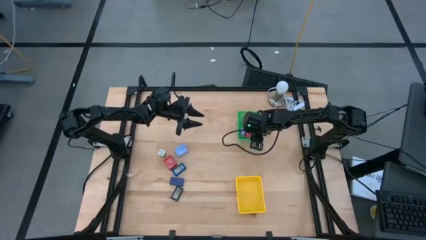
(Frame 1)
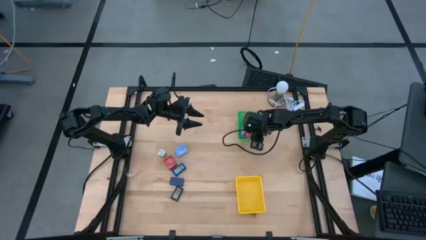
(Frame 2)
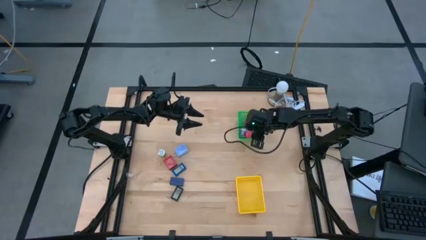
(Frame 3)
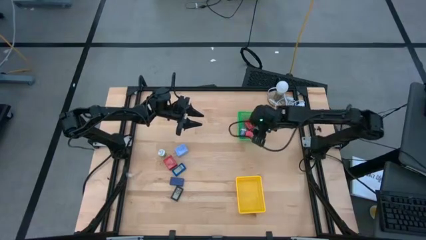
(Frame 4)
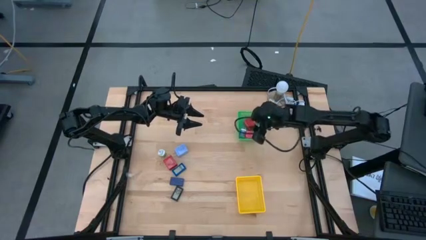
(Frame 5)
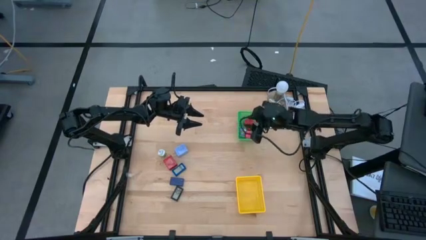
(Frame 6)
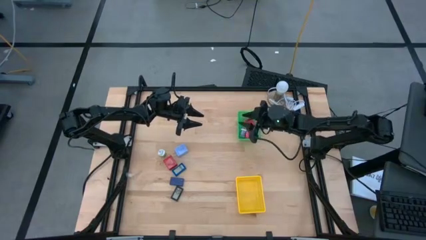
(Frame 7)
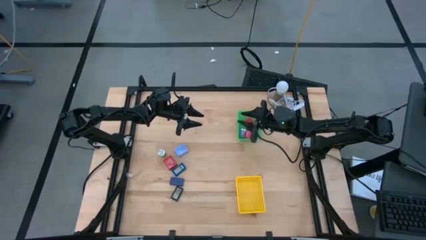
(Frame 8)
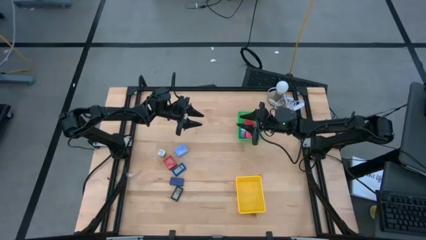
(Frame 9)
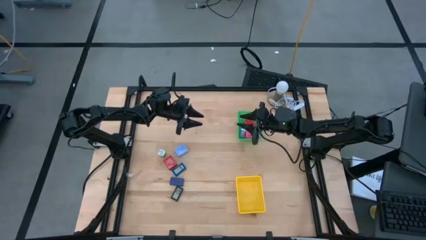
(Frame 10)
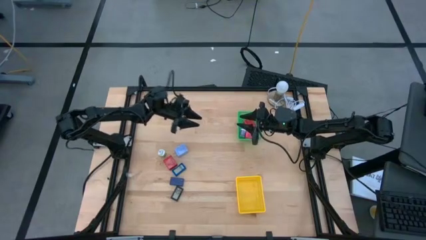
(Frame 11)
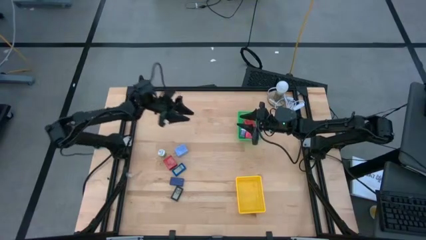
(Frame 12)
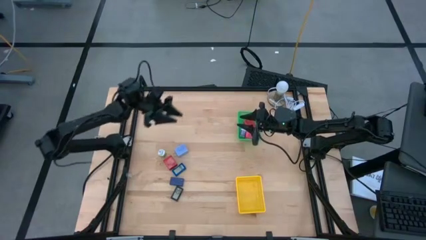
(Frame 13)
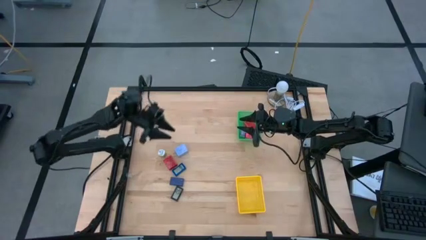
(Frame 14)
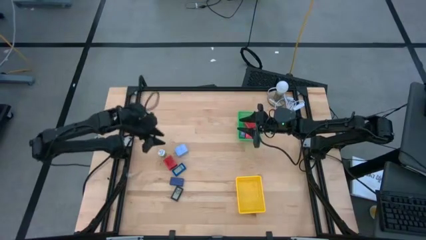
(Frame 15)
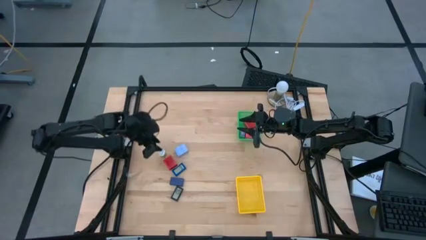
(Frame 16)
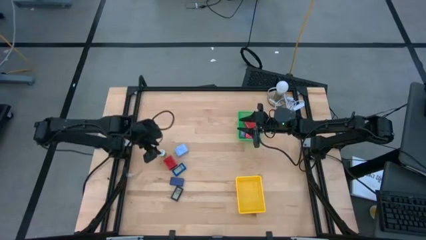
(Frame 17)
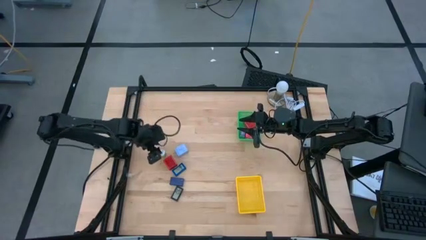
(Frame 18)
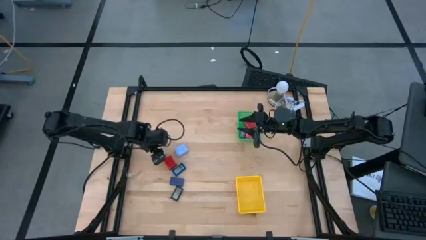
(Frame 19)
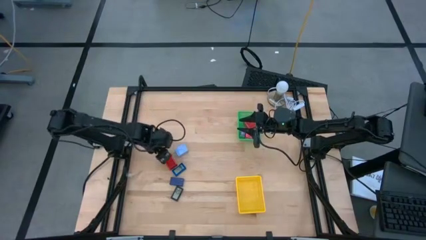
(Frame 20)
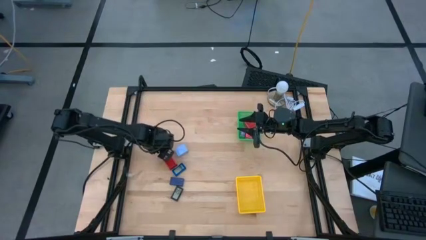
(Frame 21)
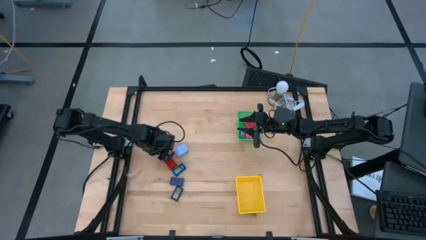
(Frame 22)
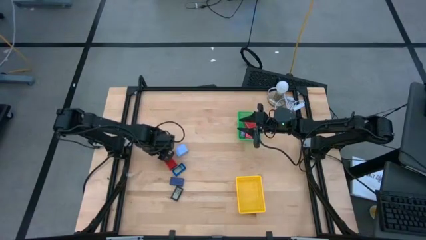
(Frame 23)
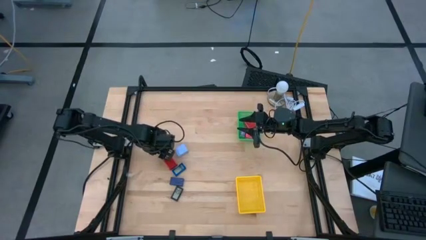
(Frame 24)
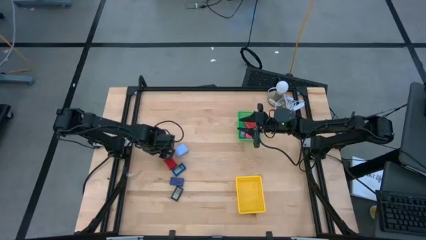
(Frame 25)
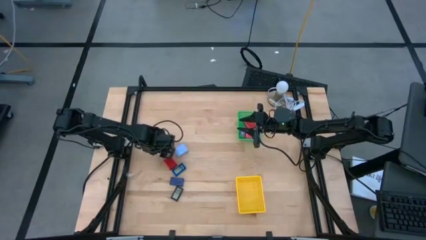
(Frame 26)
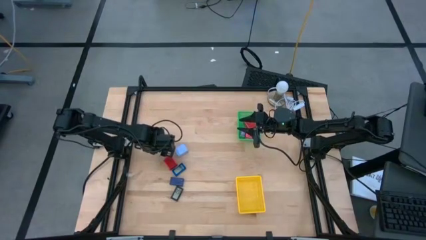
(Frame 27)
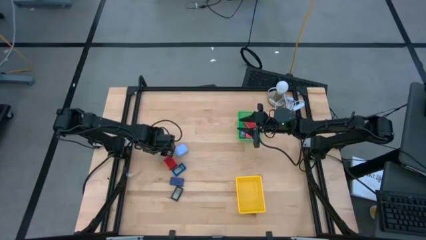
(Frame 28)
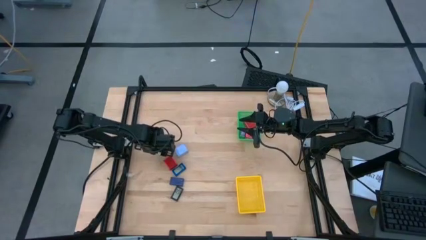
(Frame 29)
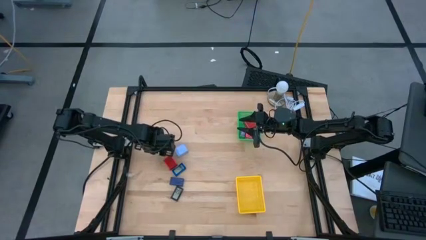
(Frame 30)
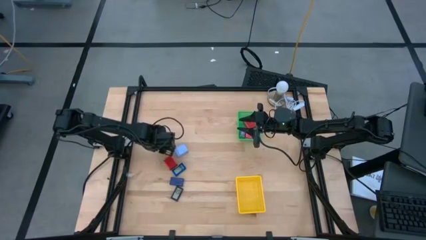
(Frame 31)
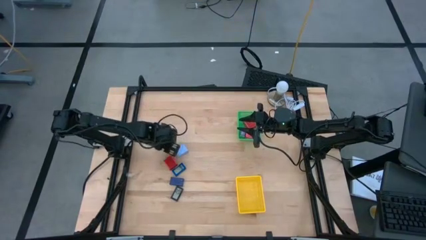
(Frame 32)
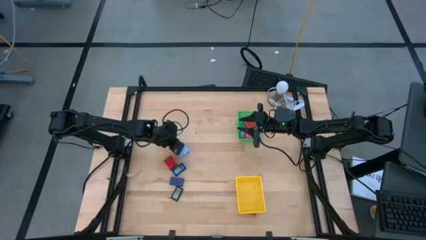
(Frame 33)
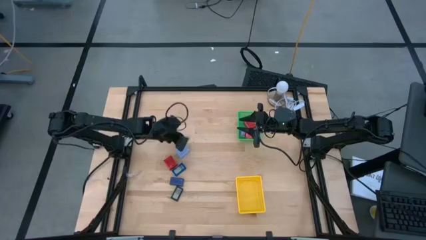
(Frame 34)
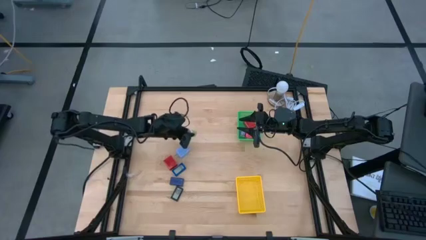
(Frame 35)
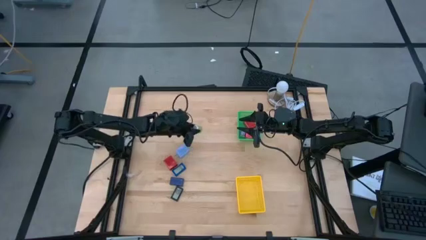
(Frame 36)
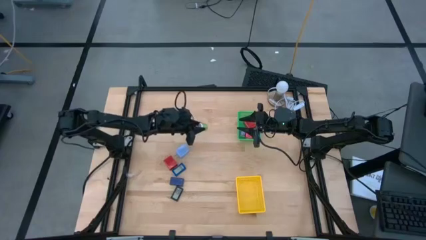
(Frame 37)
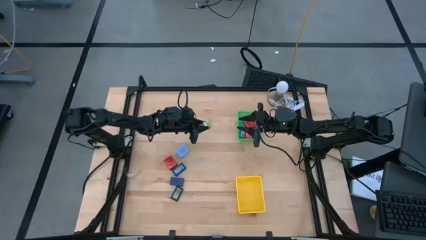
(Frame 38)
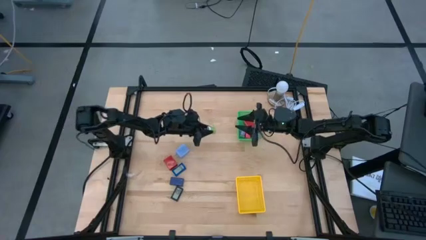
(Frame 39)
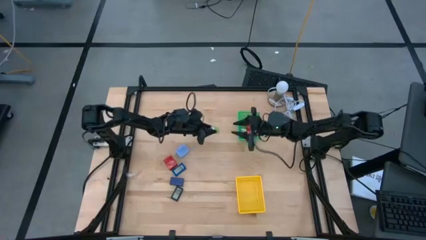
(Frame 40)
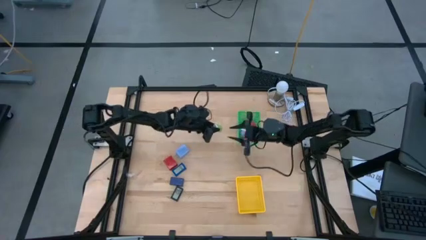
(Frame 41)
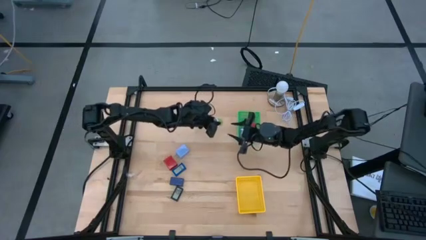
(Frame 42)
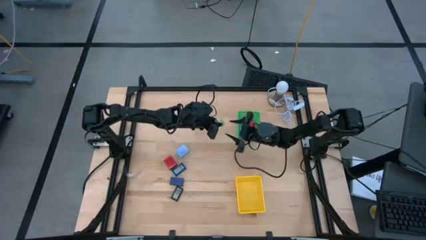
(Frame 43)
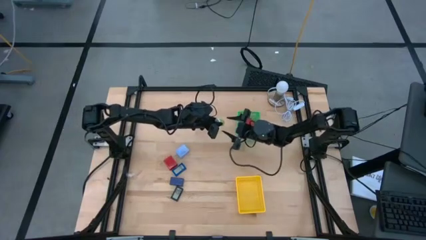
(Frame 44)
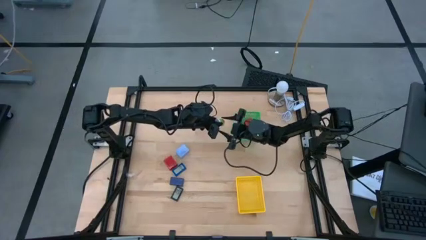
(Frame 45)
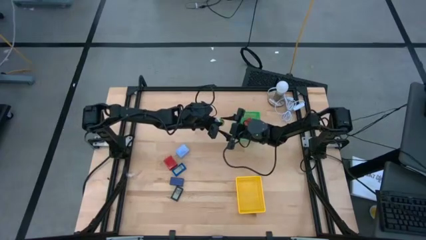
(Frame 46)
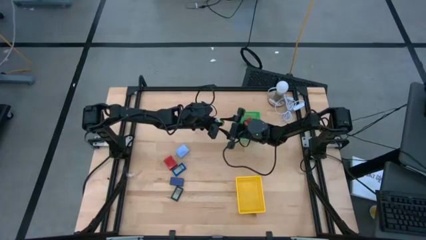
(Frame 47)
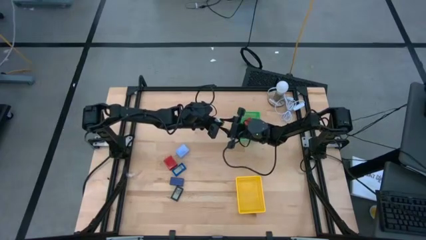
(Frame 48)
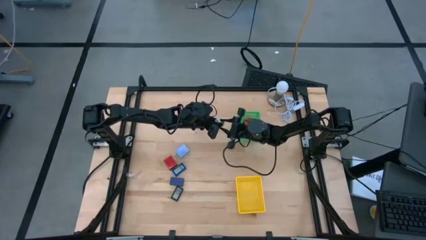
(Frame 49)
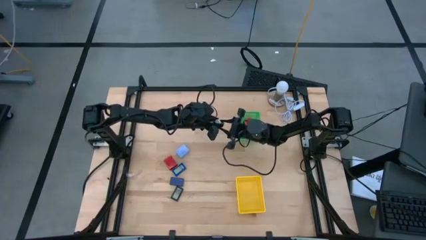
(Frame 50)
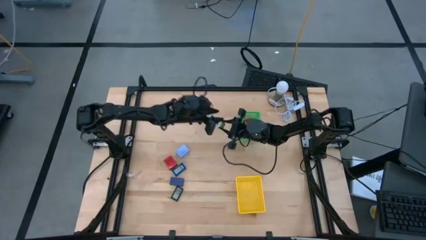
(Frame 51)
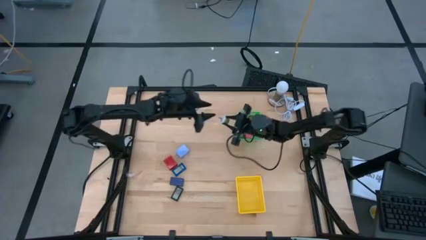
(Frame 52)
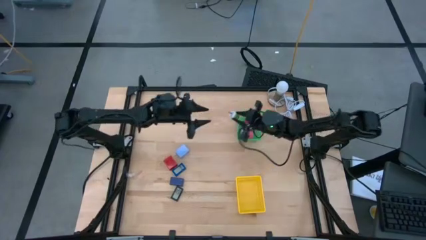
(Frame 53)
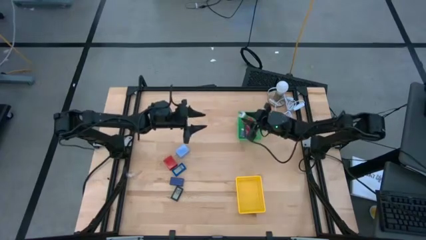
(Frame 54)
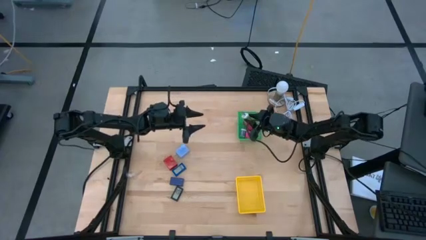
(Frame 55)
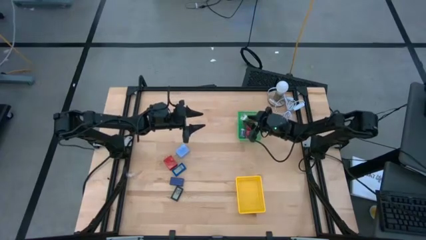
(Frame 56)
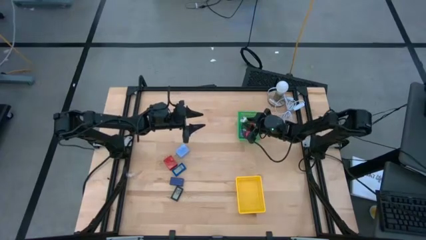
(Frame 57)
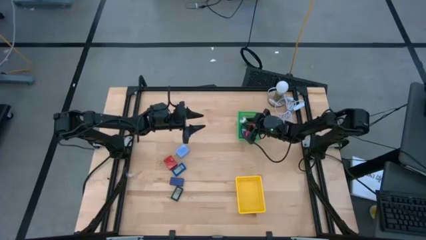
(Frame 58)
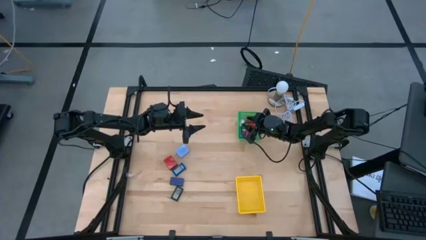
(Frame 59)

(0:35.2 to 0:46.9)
Task: Pick & Place Office items
Put the green charger adapter into the green bin
